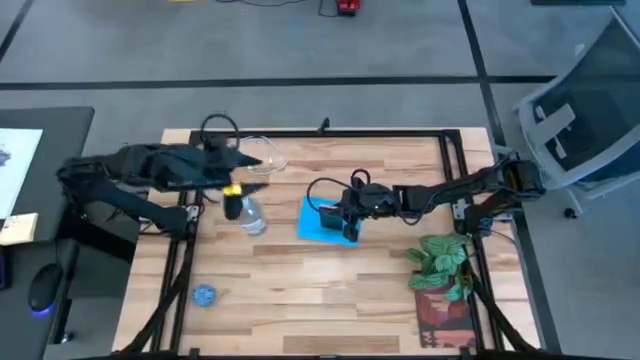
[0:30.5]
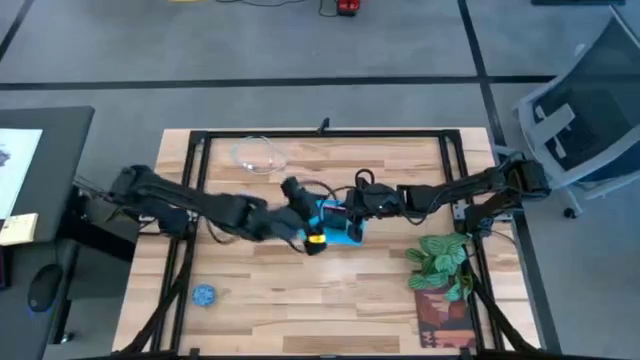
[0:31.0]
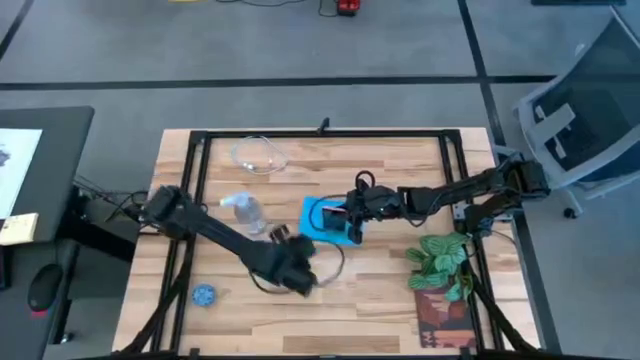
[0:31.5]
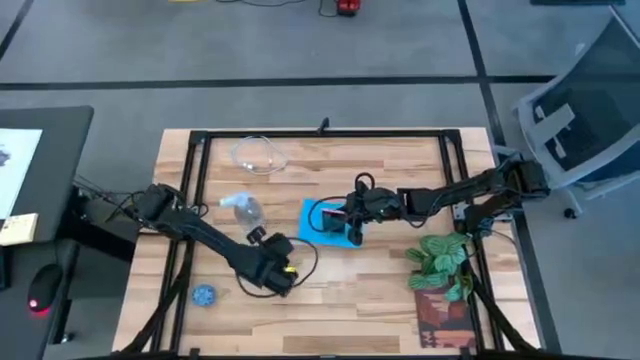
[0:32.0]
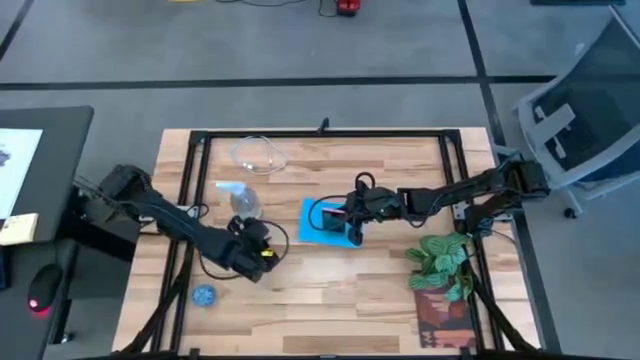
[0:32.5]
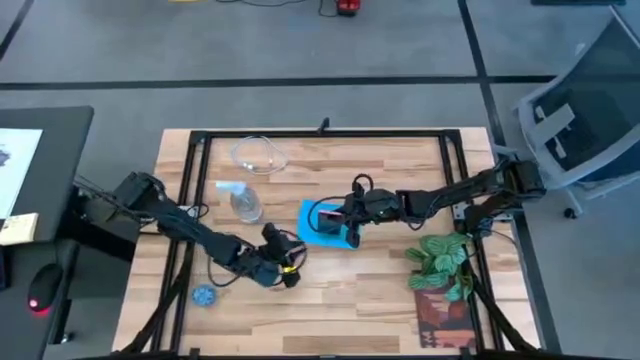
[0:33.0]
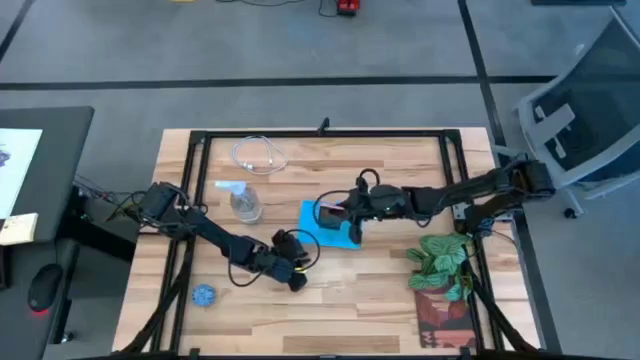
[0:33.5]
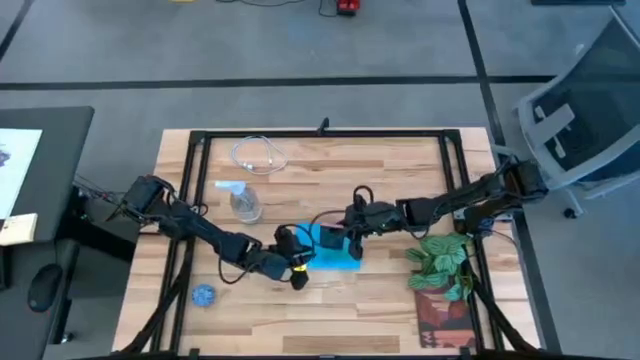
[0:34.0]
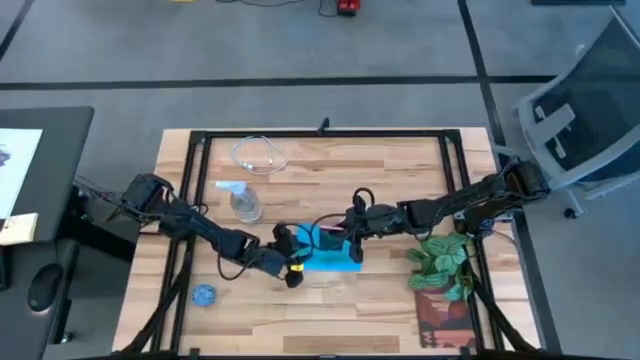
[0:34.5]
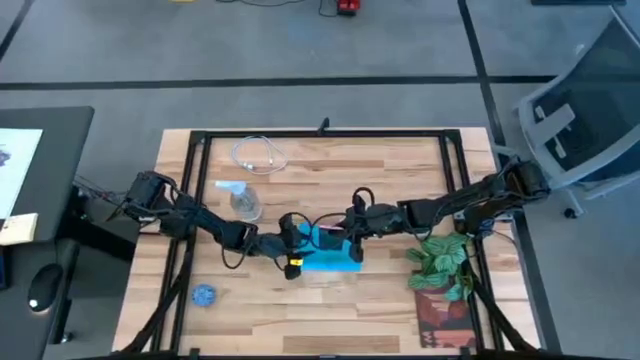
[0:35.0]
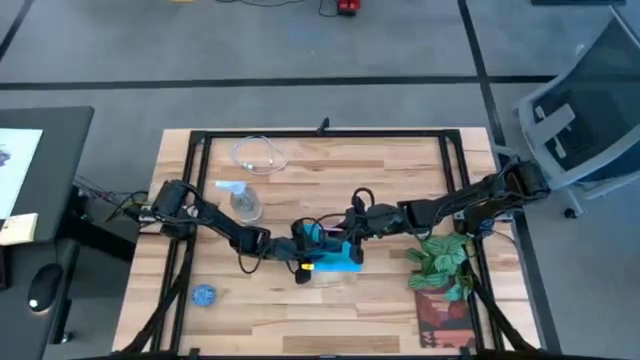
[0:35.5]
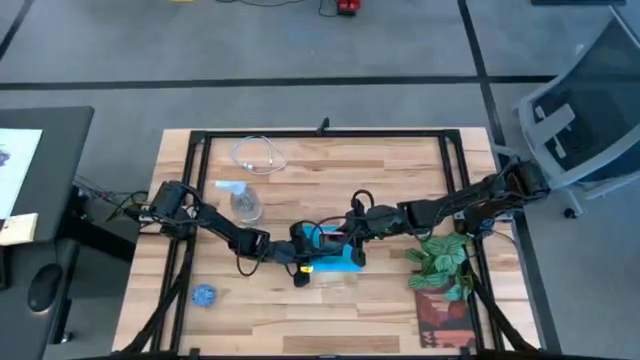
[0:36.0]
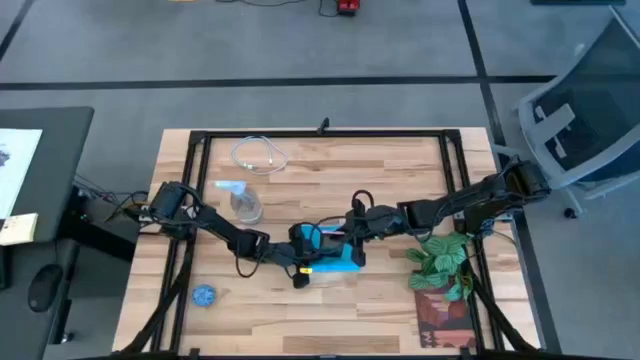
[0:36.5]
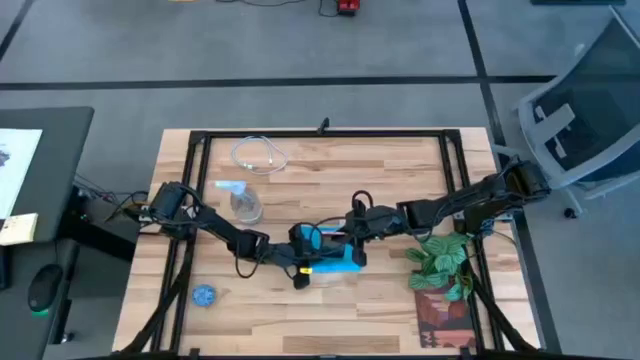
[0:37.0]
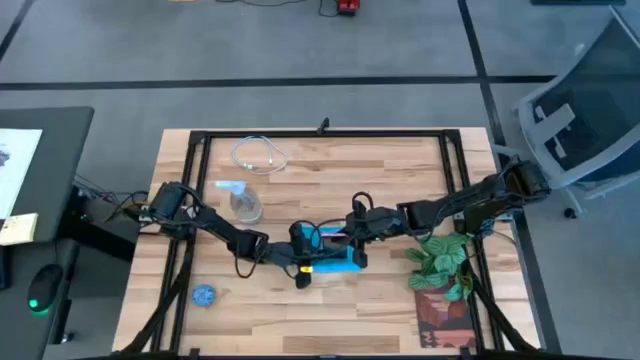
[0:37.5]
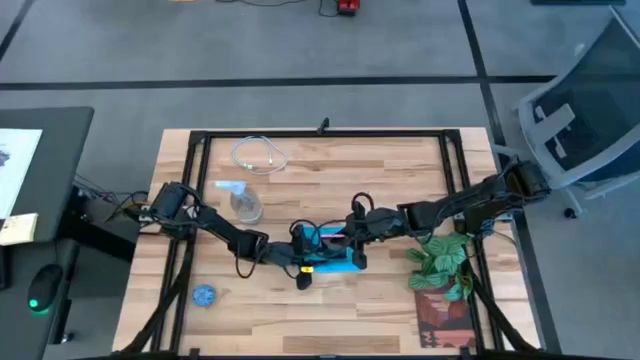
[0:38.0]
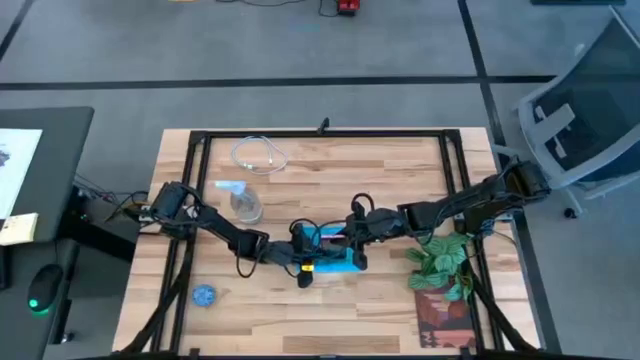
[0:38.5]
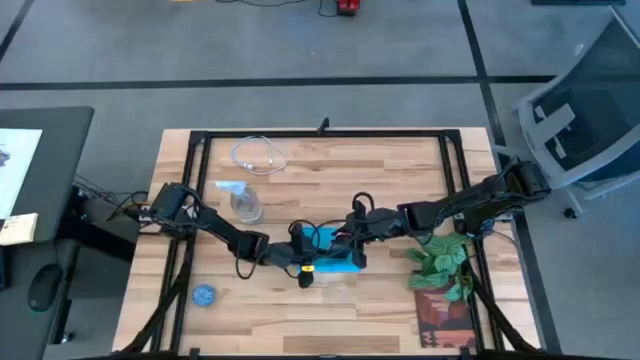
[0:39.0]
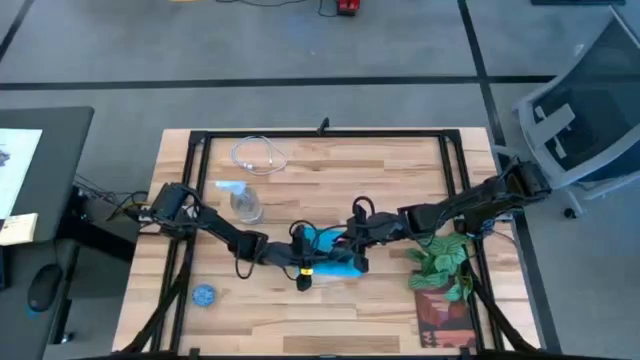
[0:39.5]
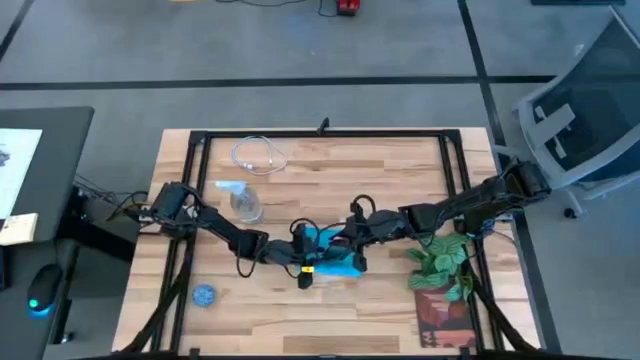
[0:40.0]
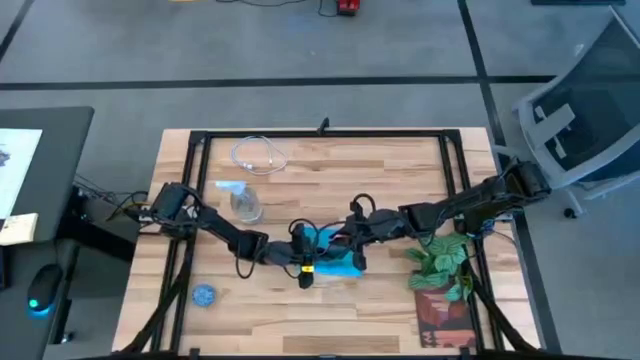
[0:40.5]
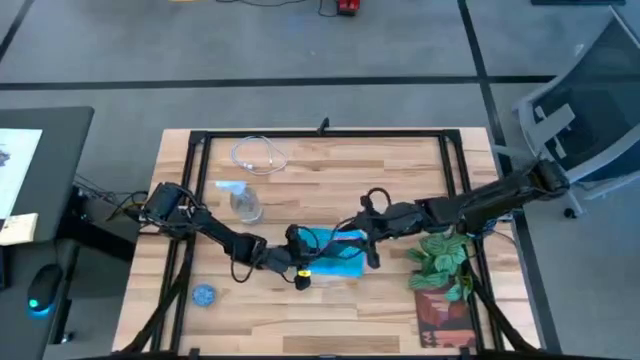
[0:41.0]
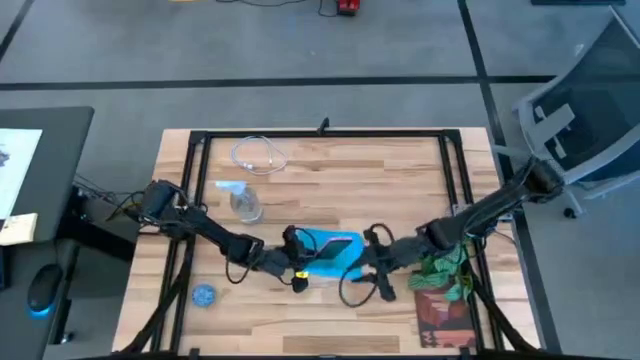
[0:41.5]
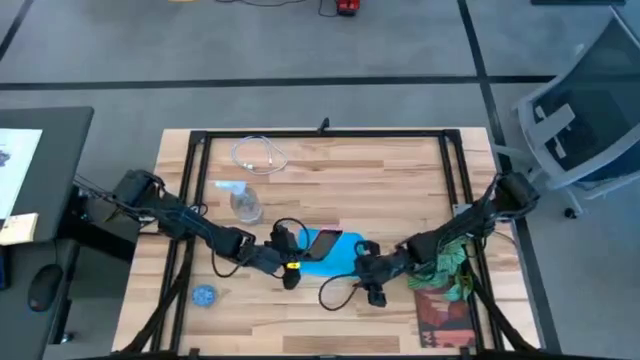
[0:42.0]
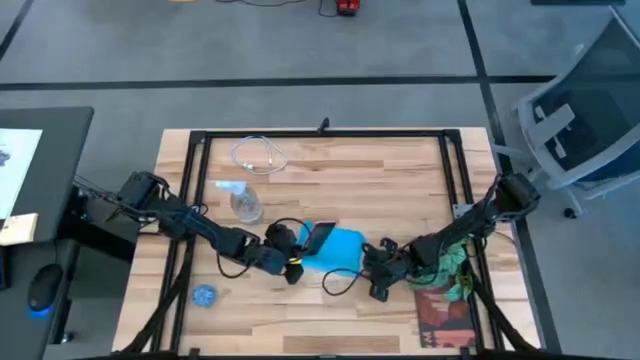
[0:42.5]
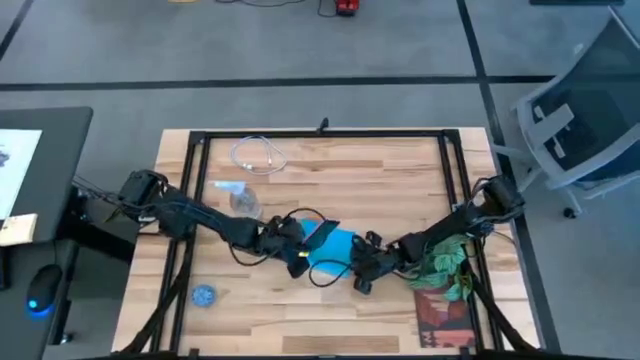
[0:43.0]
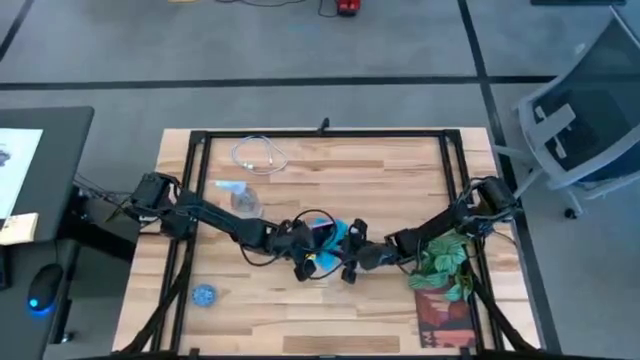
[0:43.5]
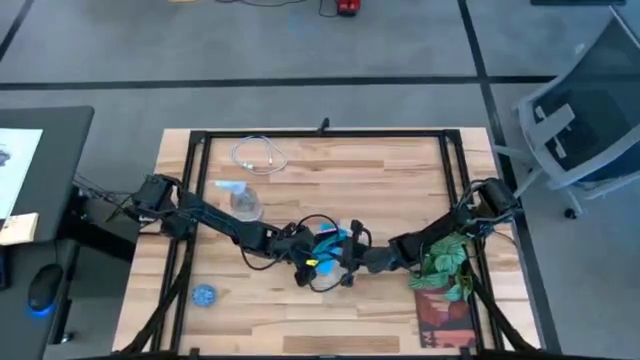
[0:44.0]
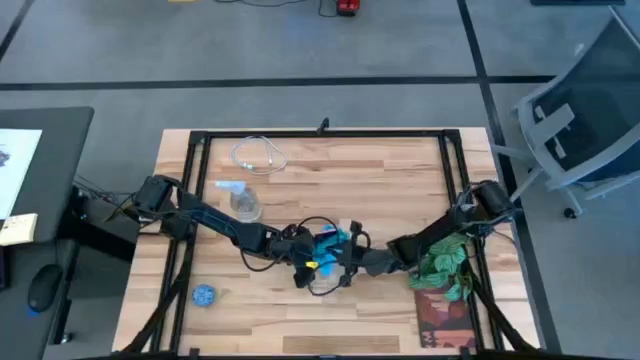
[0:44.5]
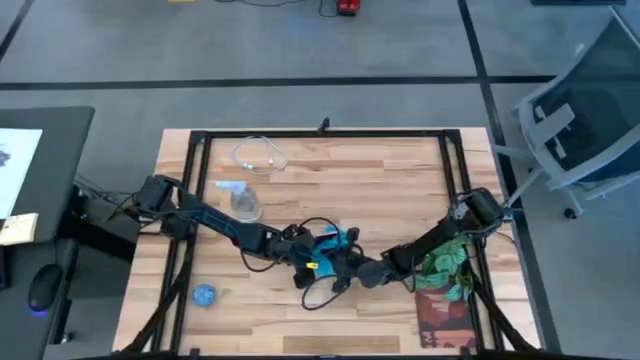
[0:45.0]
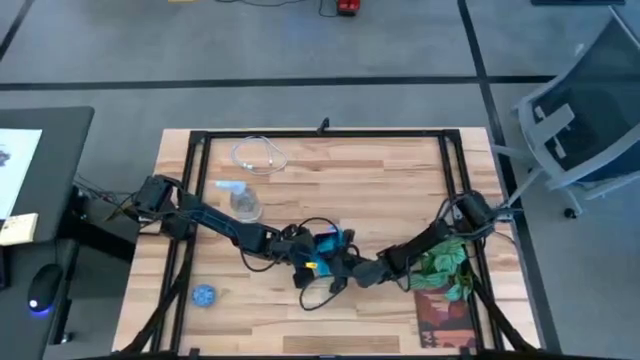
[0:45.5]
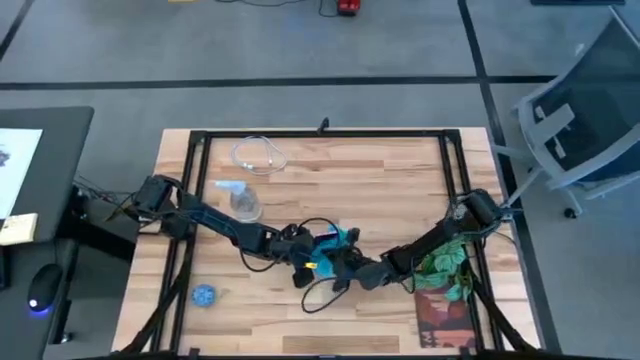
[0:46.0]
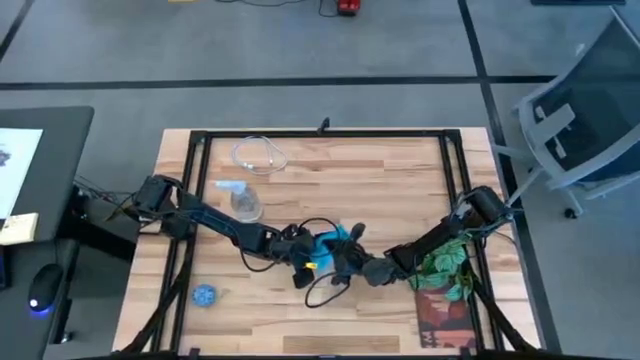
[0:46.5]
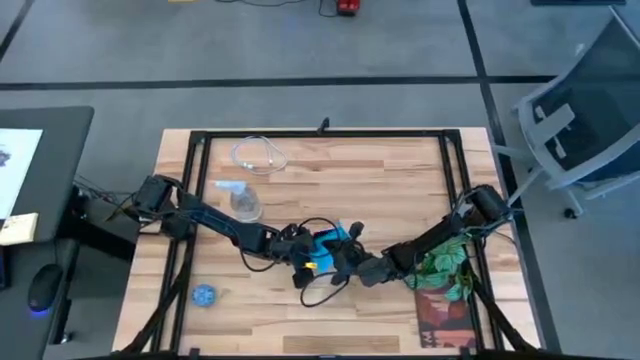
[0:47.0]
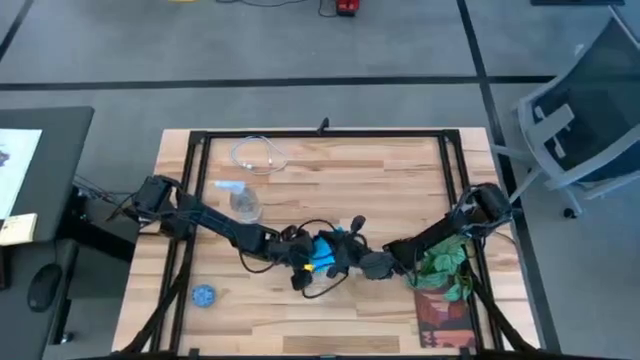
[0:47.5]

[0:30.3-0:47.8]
Task: Apply microfiber cloth
Wipe the front of the cellphone with a microfiber cloth

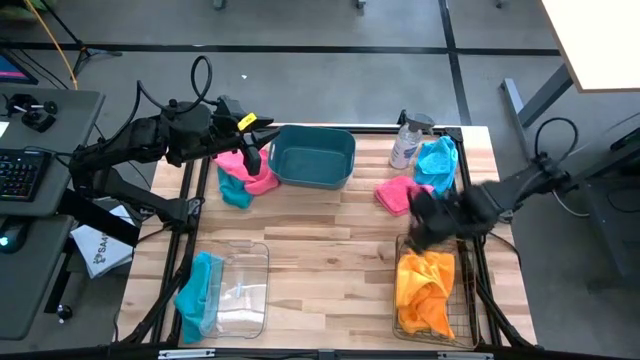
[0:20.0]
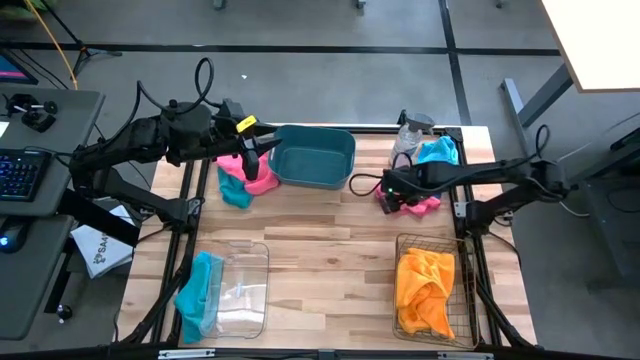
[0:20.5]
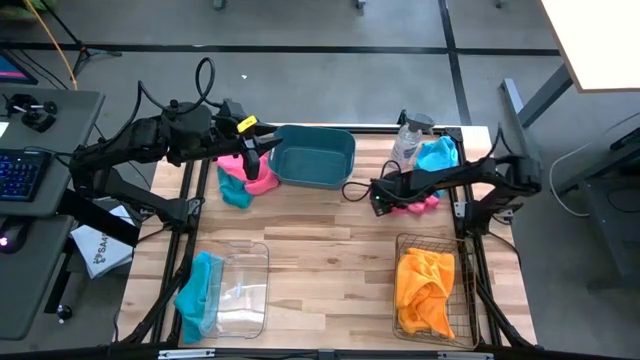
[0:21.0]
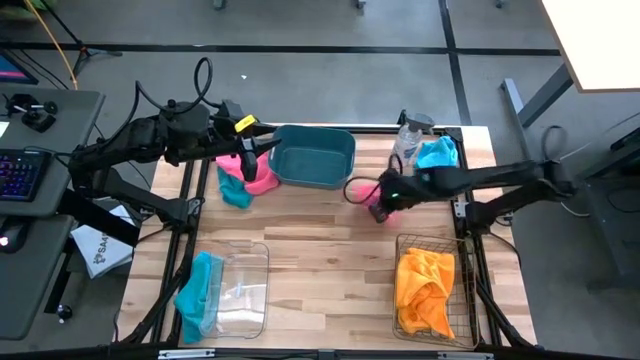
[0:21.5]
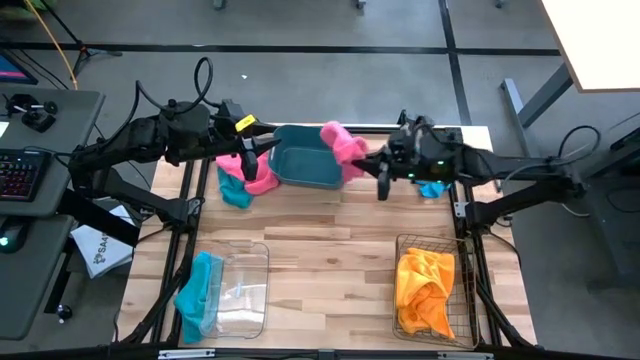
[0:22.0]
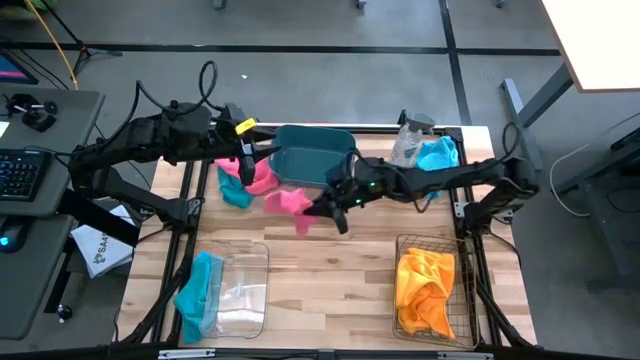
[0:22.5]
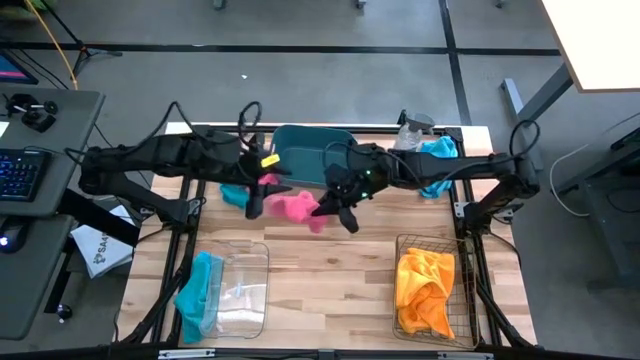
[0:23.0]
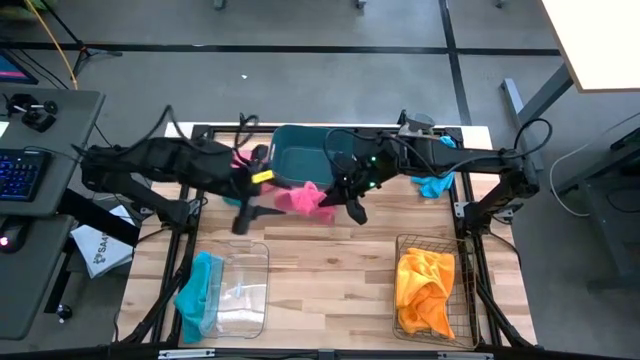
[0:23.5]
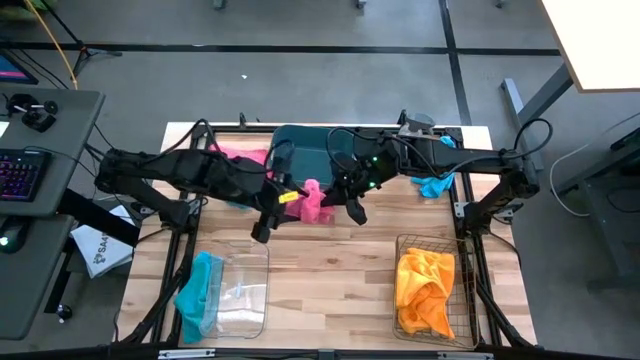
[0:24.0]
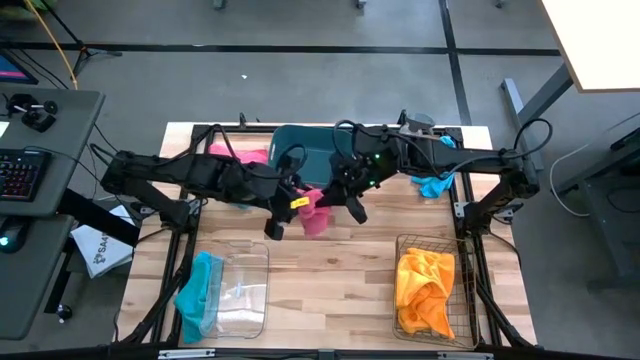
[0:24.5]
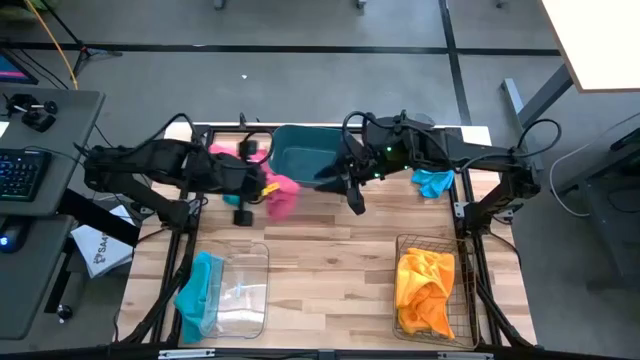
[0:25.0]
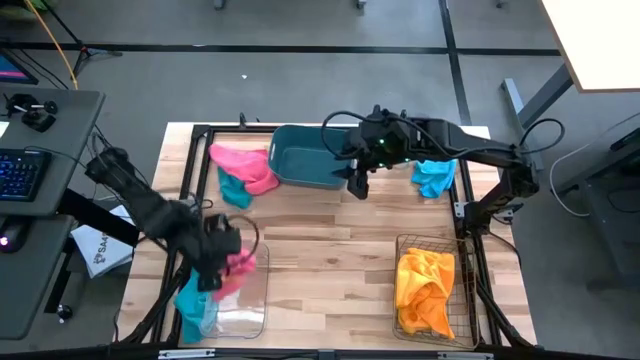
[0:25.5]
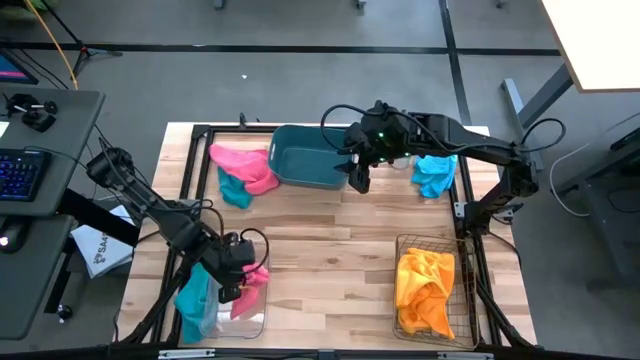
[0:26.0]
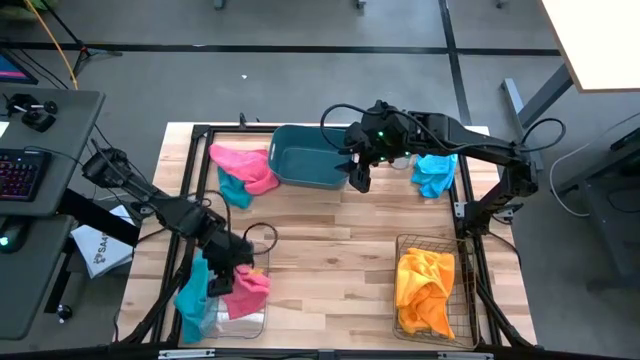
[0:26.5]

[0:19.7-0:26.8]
Task: Sort microfiber towel by color & place in baskets
Put the right pink microfiber towel into the transparent bin
